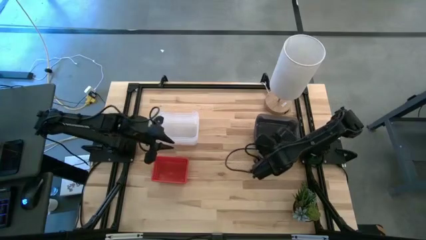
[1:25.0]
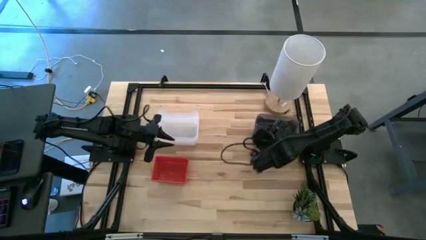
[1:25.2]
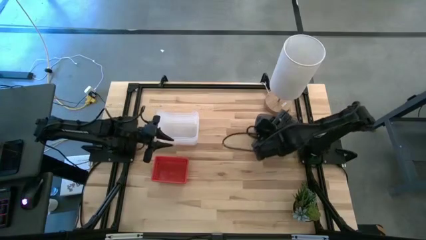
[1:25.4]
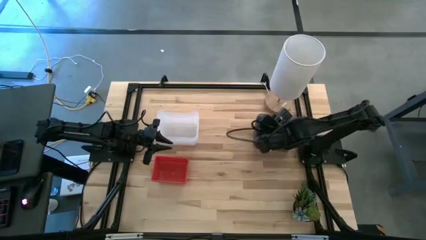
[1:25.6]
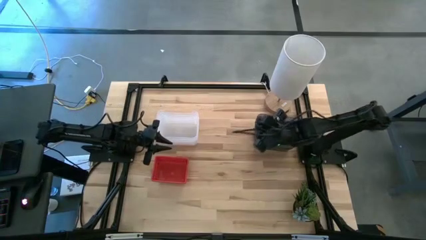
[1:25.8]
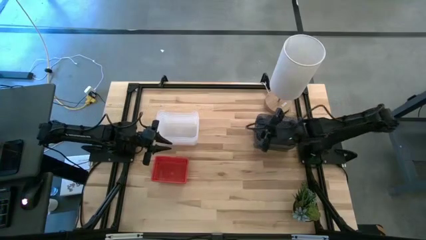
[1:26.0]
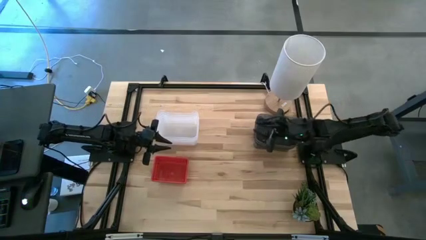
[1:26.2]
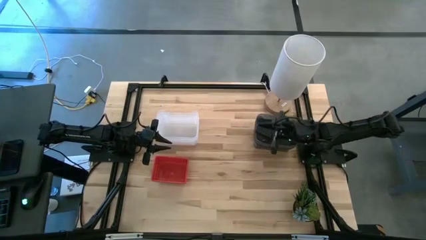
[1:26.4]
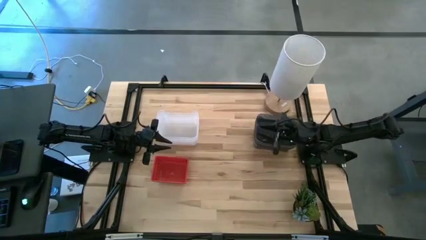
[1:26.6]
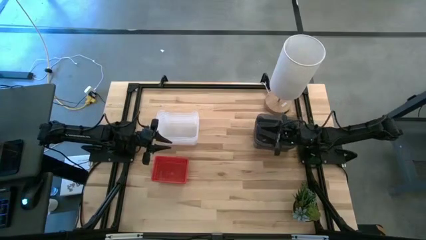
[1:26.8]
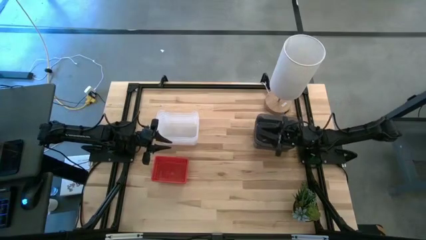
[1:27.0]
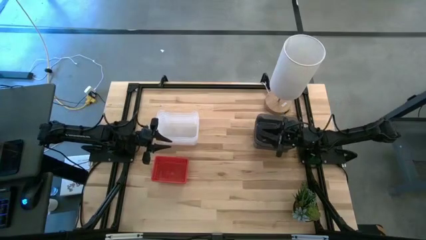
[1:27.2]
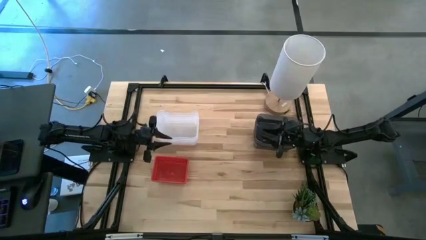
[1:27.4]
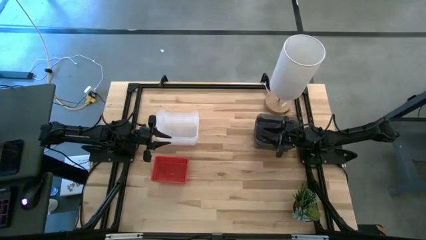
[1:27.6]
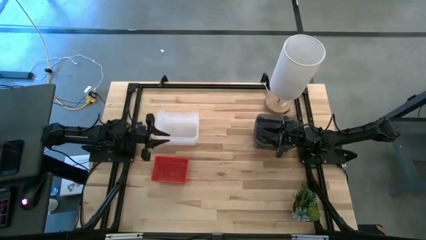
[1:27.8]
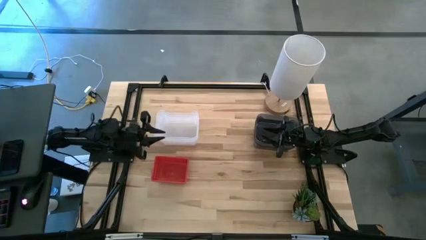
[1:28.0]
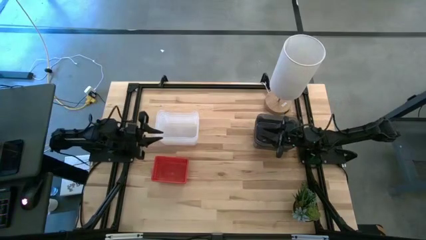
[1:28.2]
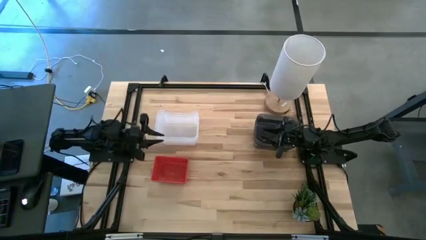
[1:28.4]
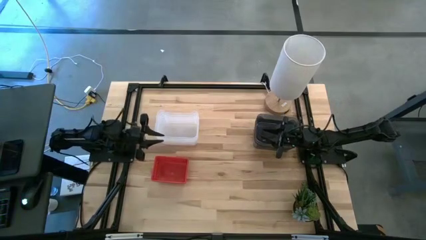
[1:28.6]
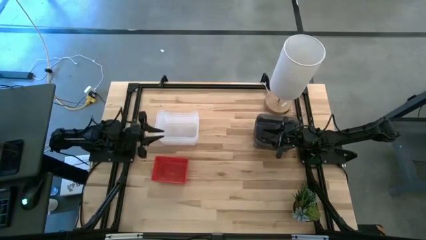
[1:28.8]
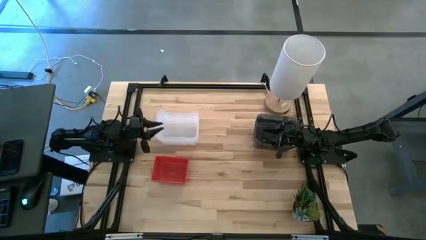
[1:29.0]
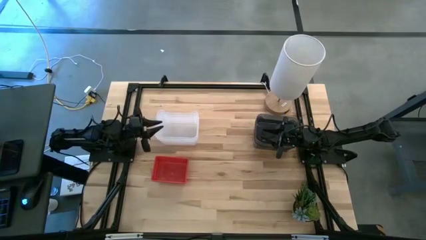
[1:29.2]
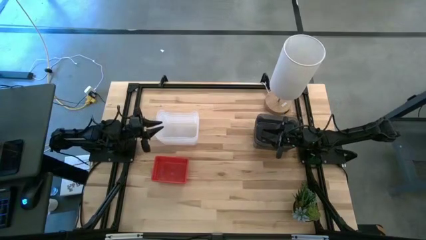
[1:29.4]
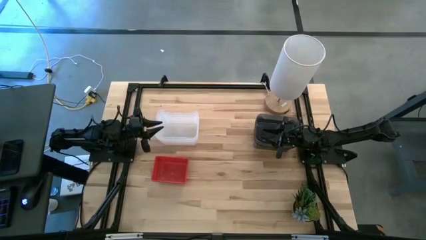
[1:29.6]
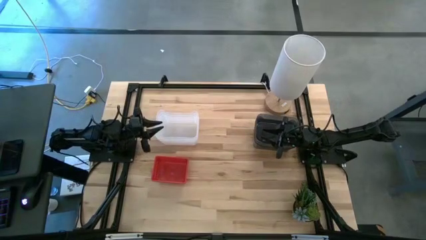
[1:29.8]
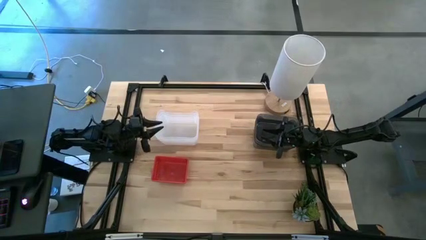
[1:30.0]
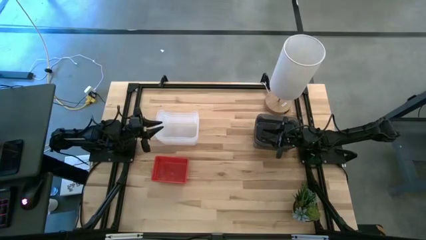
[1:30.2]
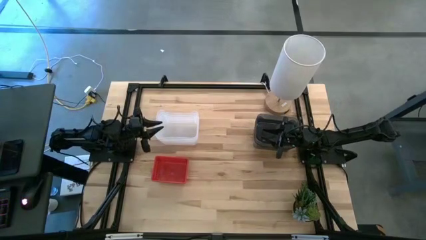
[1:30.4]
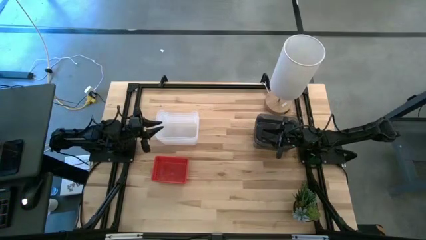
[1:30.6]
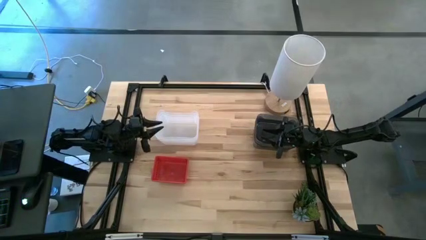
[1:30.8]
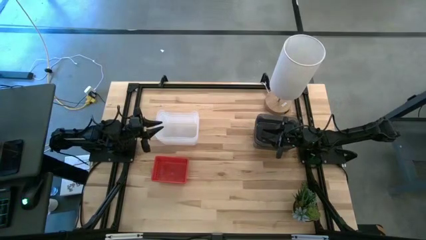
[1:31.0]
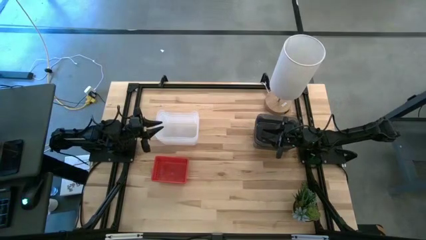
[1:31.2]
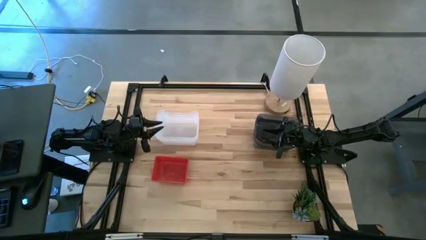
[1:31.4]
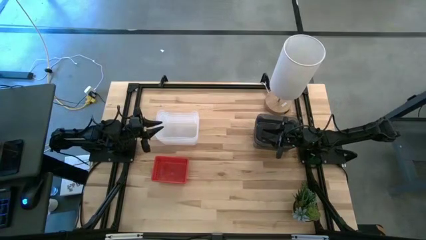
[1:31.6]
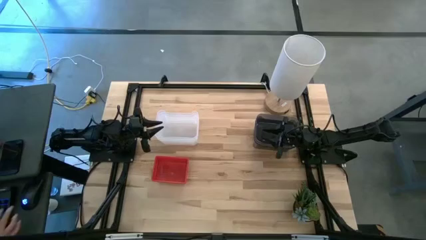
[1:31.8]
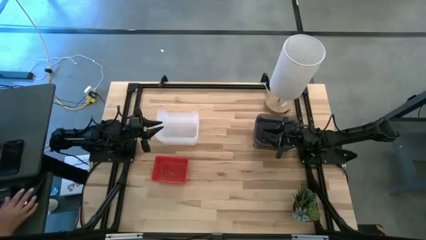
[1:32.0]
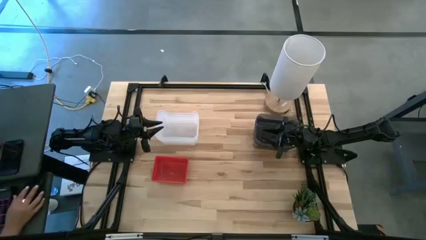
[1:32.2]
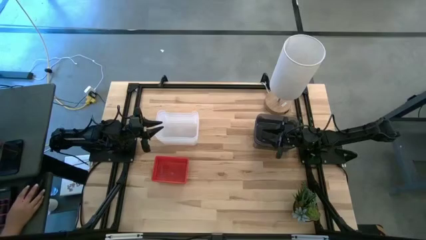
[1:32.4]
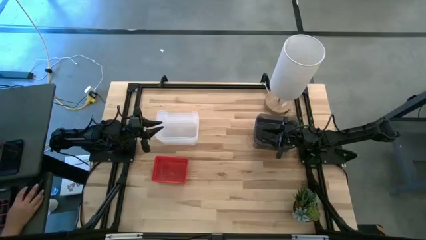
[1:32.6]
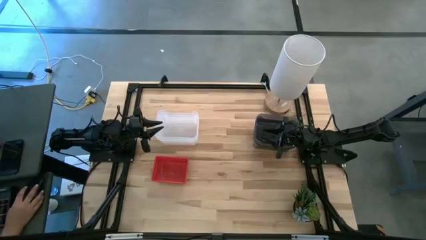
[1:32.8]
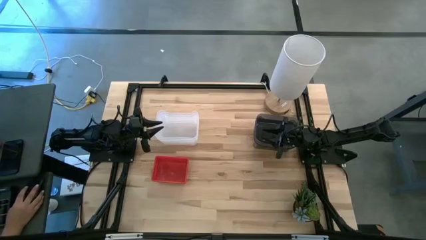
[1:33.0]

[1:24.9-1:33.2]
Return to Home Position

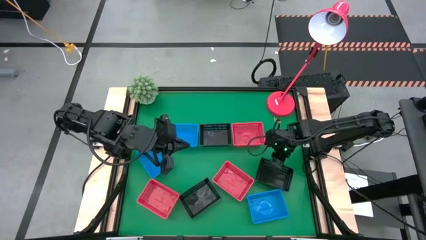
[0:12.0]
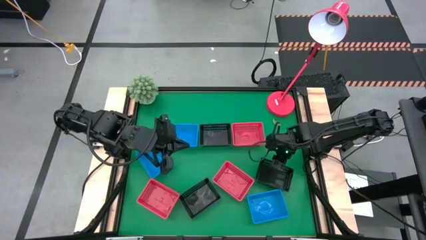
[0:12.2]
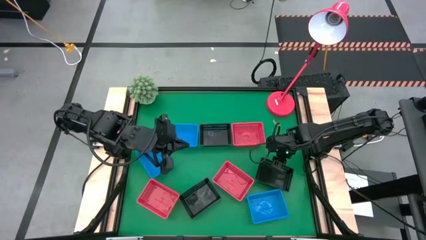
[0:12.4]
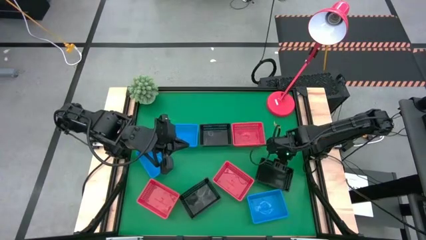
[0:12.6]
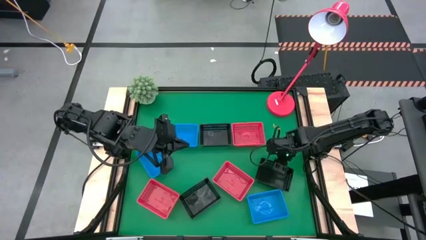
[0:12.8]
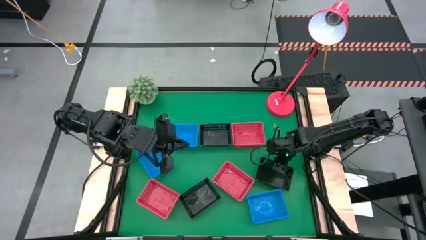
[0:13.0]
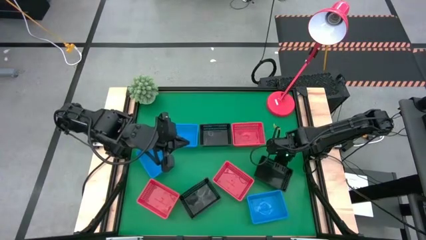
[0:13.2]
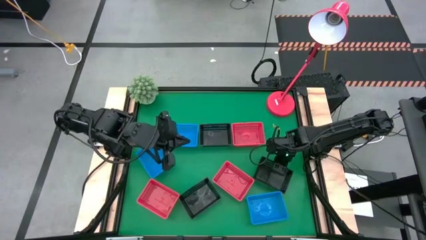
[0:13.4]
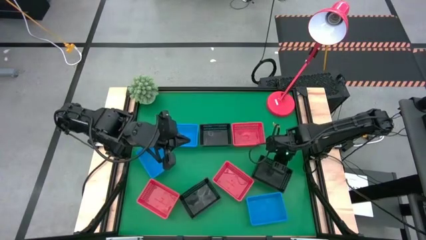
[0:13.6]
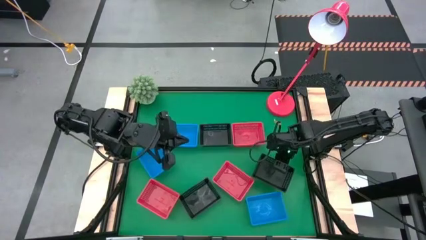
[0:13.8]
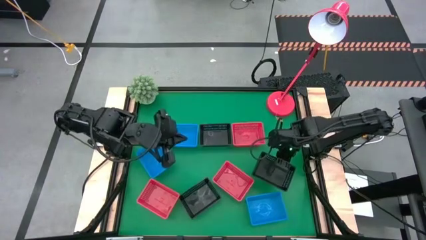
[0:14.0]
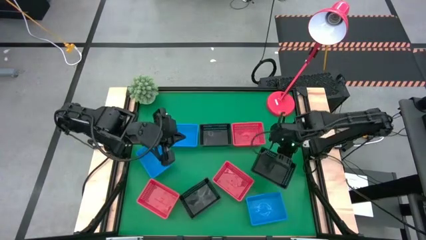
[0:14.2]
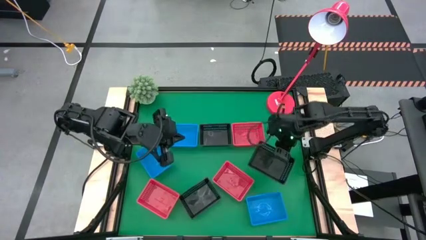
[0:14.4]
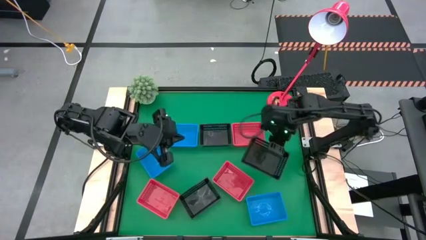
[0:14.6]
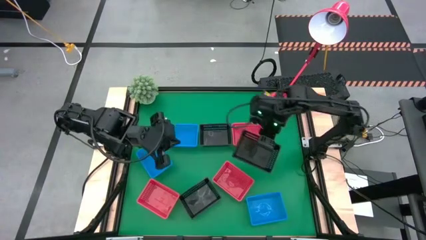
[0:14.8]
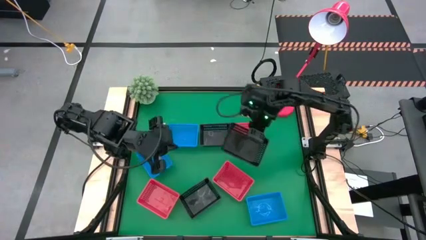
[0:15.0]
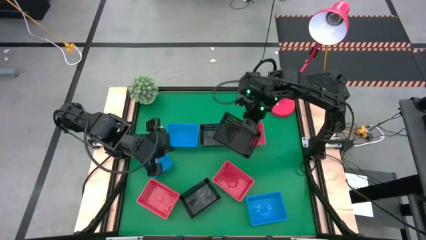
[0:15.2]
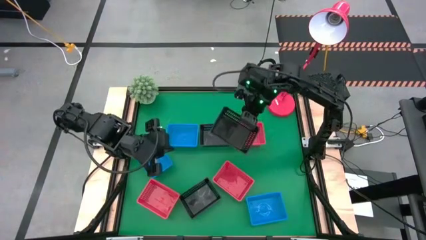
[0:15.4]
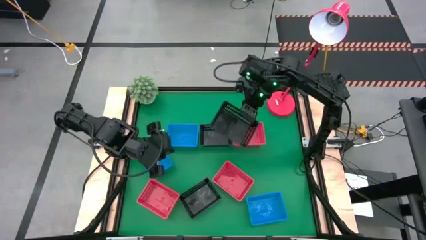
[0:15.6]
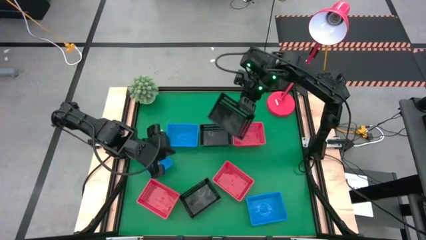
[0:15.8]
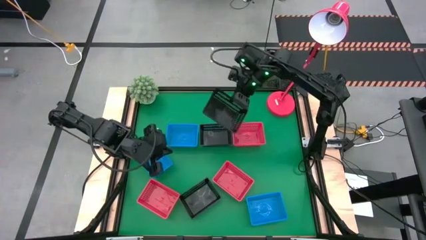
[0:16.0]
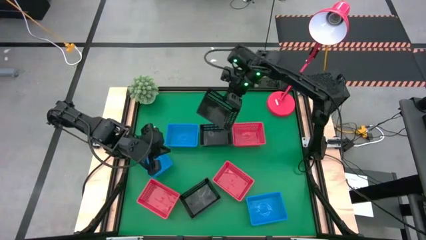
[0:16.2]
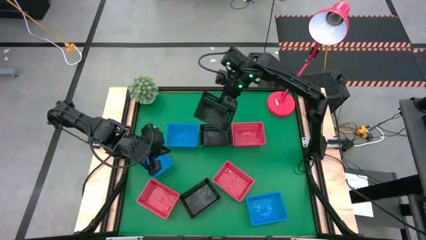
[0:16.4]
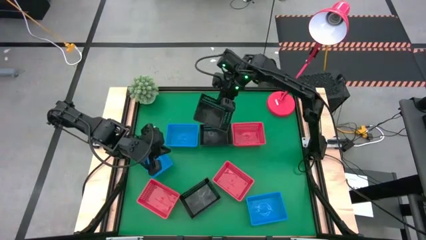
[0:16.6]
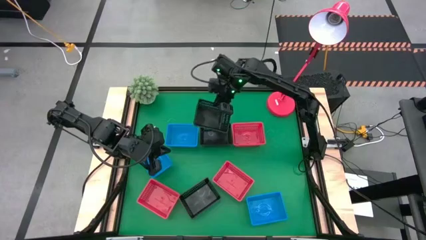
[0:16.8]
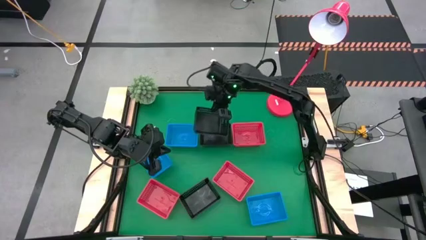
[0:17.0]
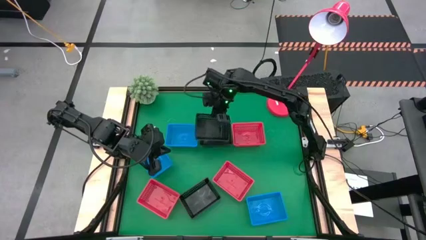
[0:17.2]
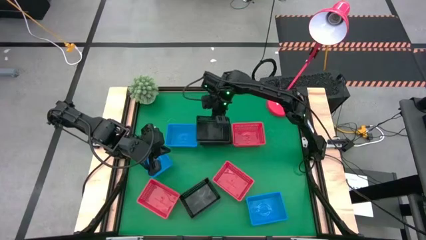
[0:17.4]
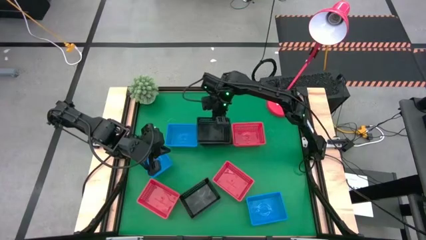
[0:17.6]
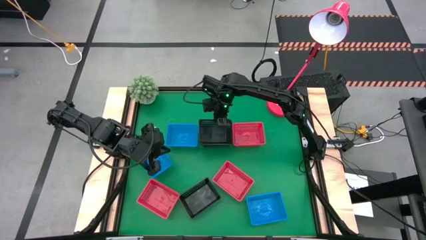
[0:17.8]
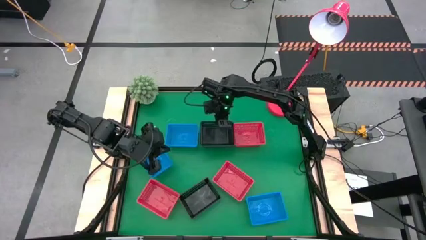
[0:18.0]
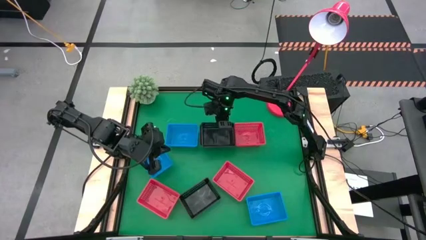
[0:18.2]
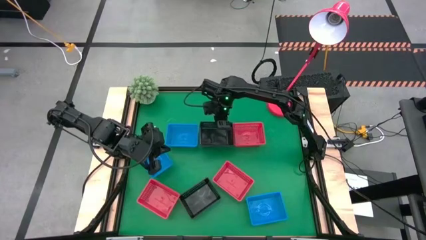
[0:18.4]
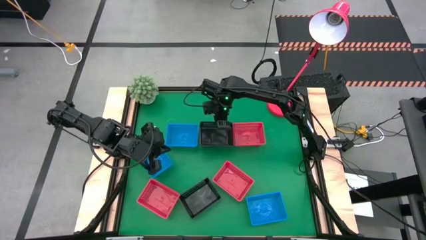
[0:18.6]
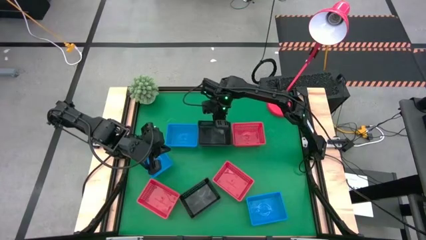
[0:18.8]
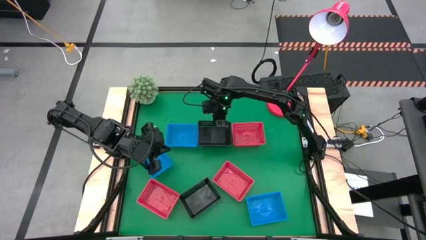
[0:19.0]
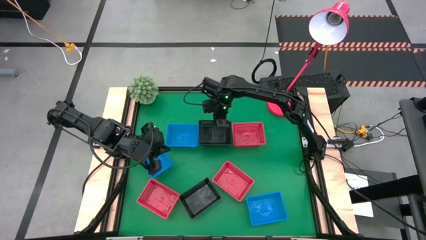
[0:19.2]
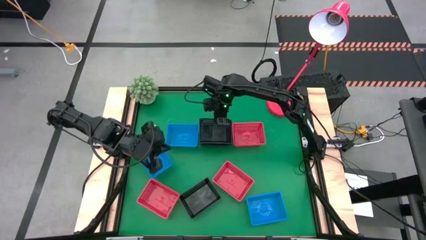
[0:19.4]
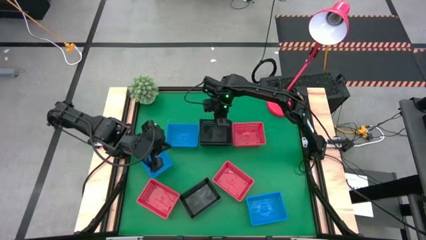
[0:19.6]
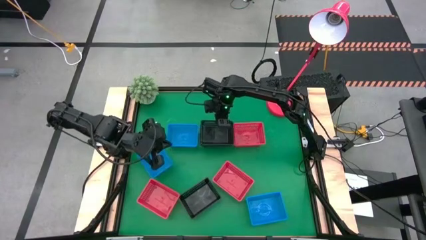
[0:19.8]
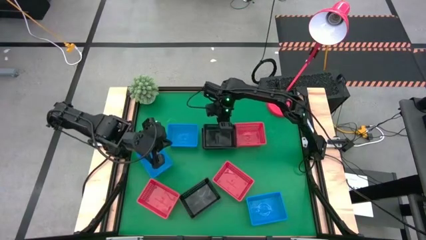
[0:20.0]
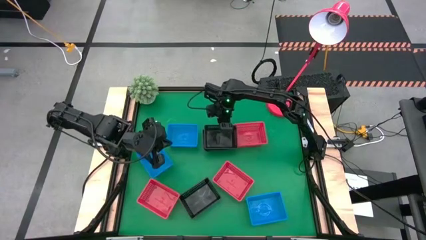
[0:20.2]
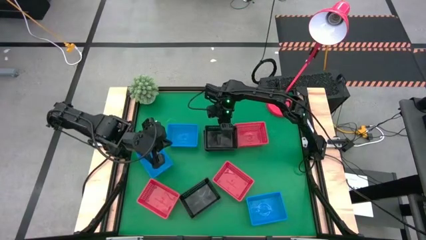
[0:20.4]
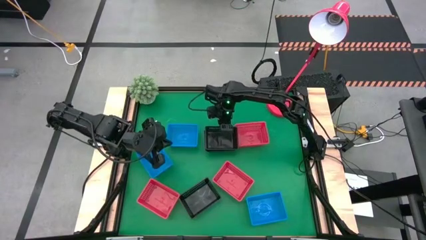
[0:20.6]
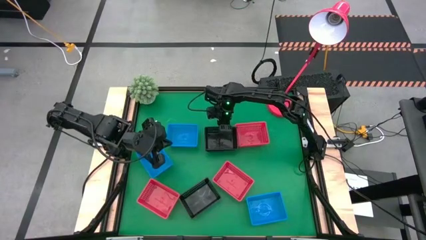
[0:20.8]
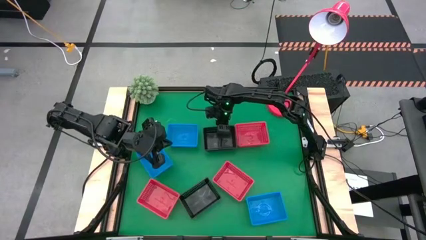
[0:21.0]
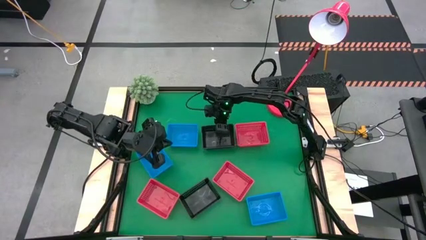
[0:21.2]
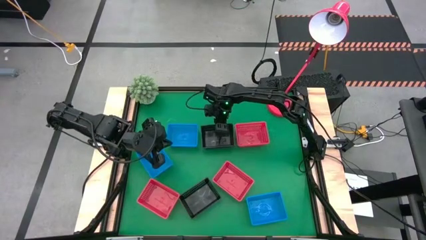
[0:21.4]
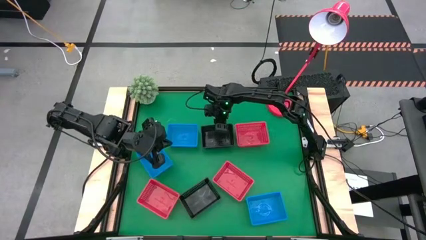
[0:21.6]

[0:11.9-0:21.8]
Stack the middle black bin on the top black bin
